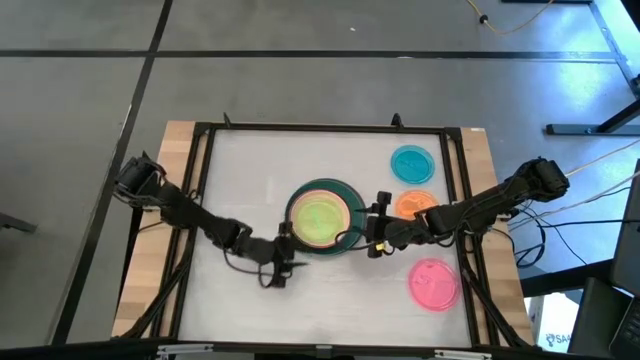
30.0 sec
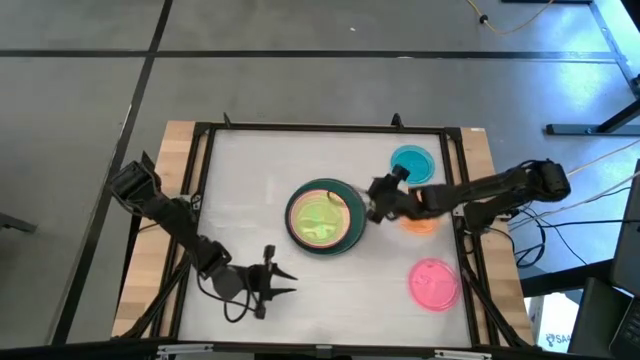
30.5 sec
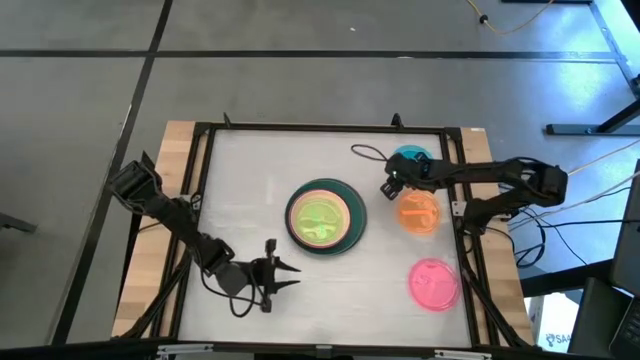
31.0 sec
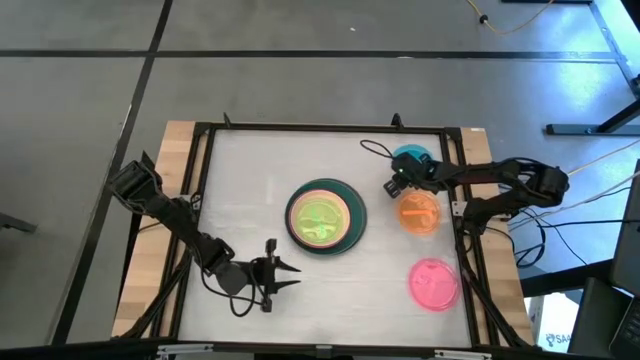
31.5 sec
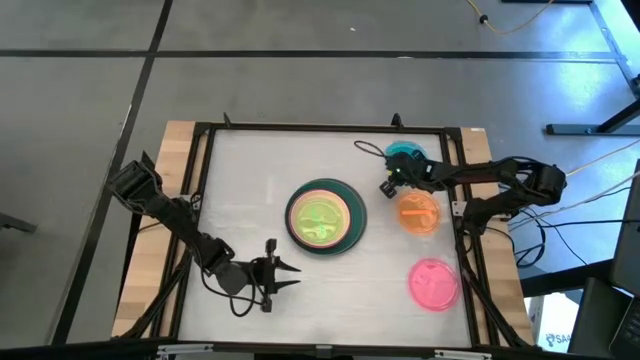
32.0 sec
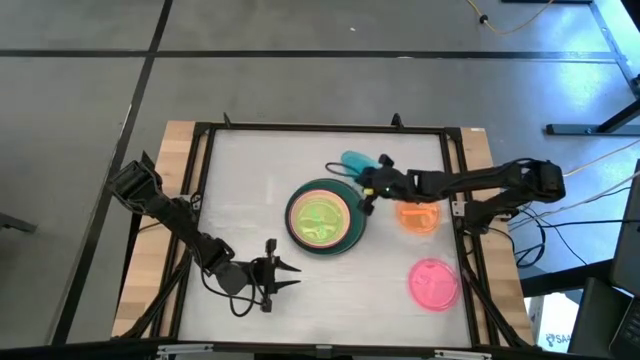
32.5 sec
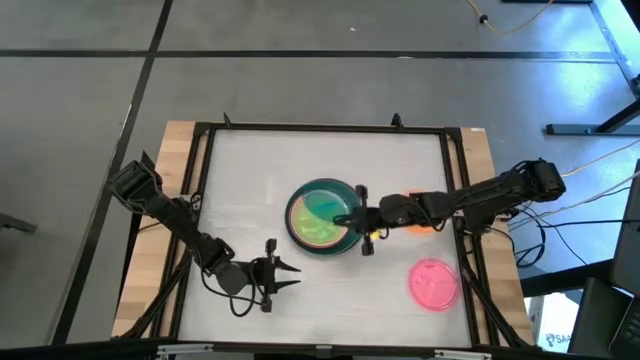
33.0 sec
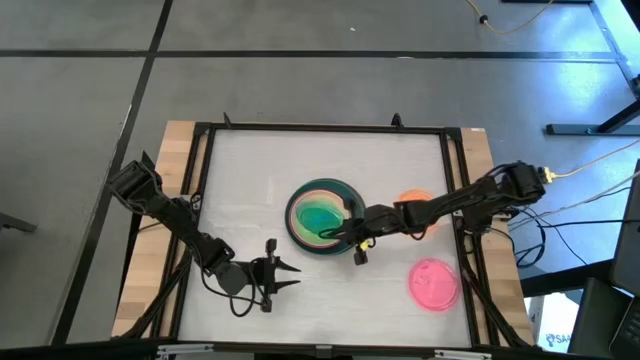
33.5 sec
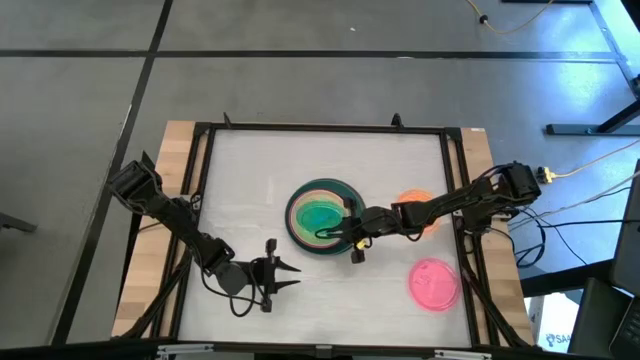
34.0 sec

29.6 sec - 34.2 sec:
Task: Stack plastic plates
Stack the blue plate on top of the green plate

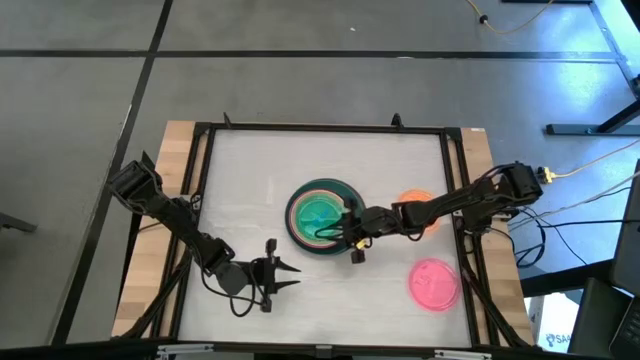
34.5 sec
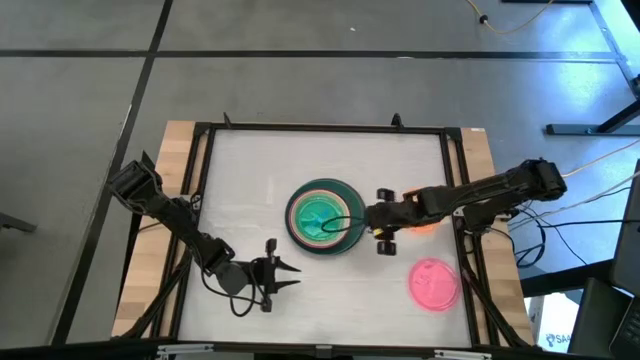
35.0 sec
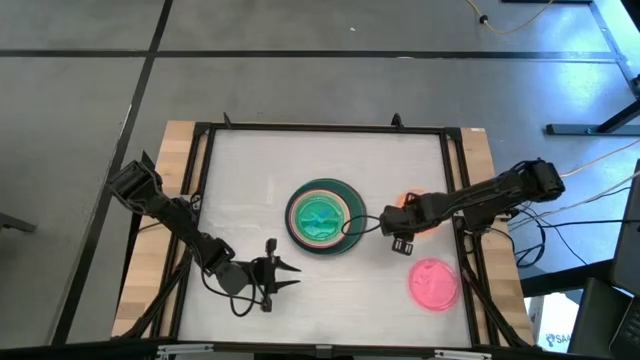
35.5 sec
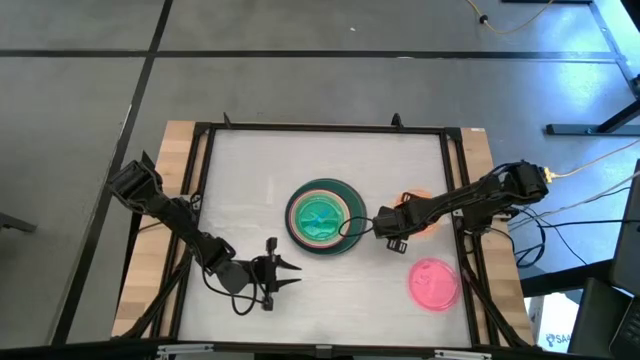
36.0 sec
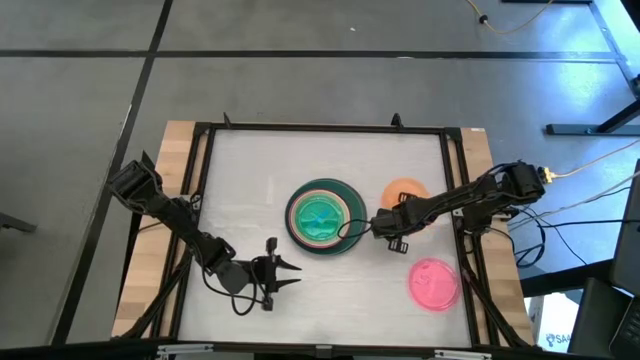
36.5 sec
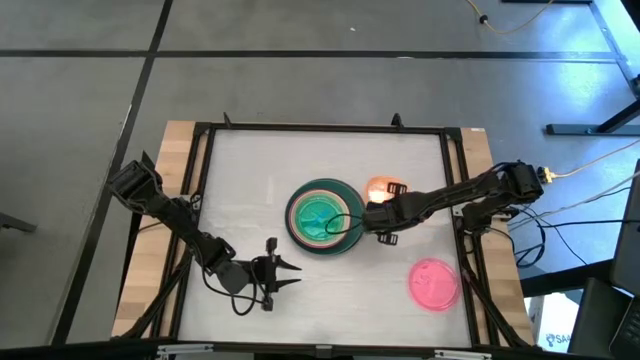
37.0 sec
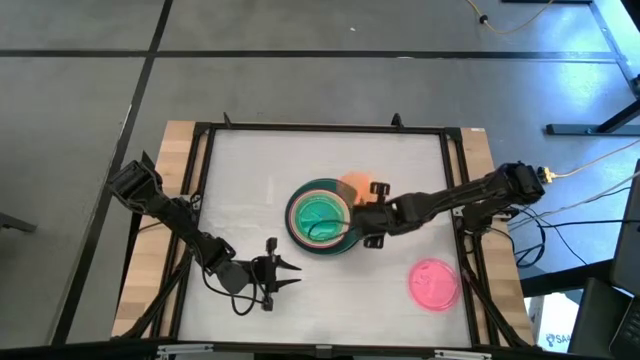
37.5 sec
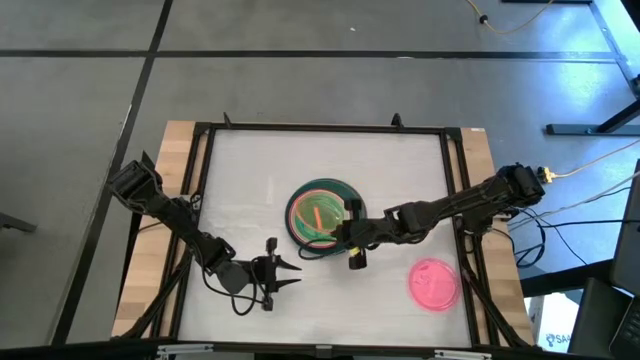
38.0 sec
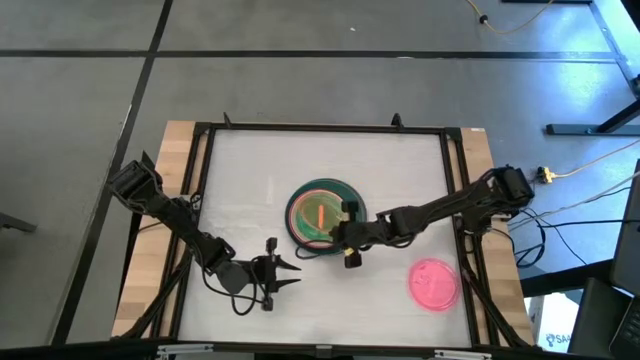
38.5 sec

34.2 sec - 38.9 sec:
Stack the orange plate on top of the blue plate

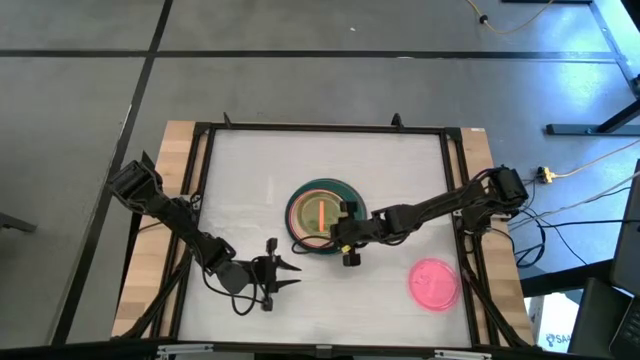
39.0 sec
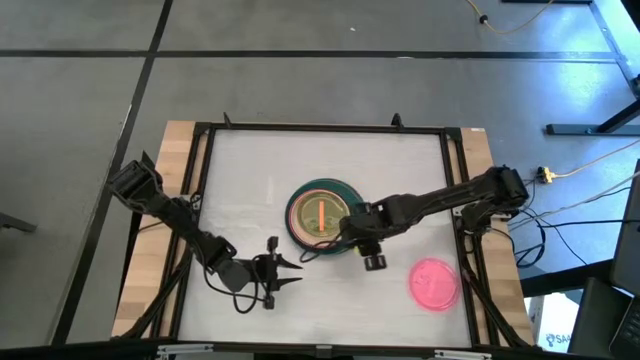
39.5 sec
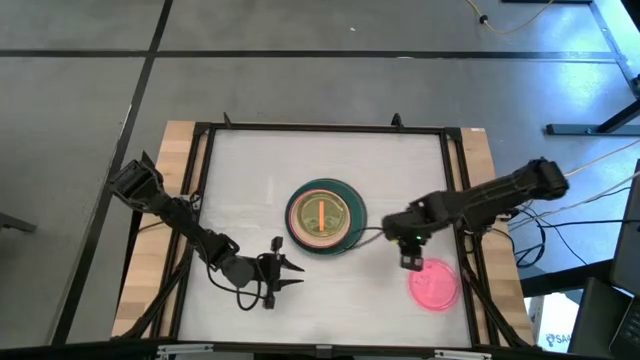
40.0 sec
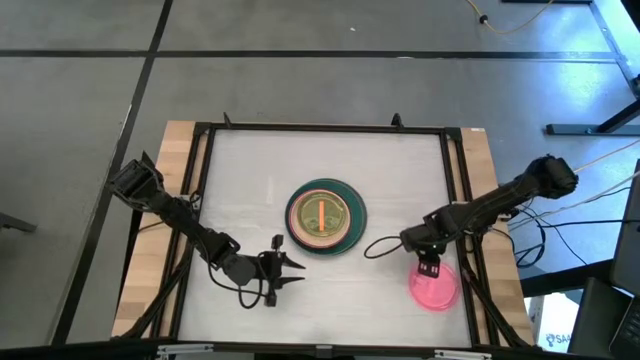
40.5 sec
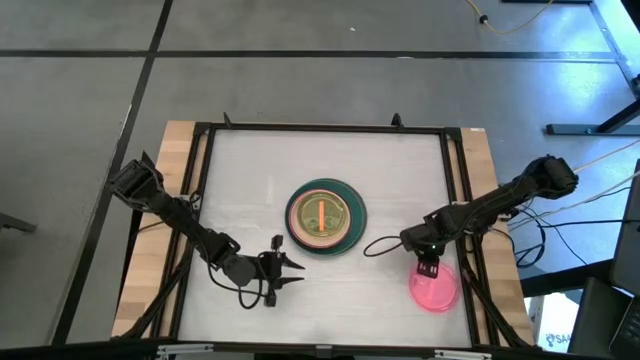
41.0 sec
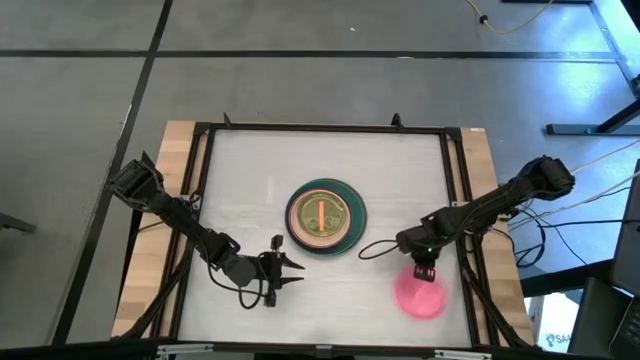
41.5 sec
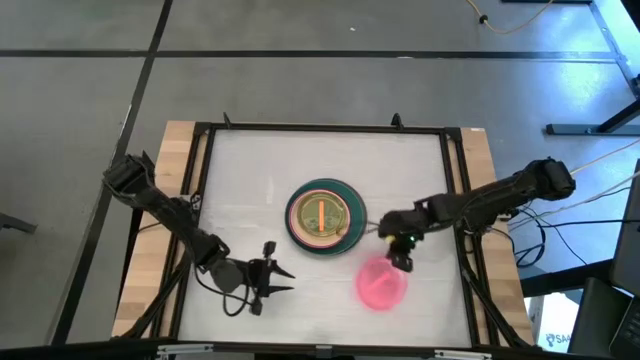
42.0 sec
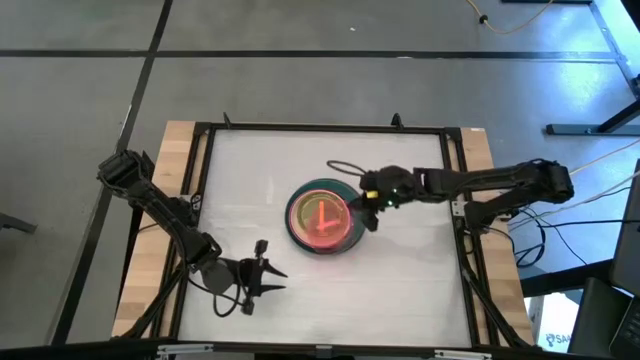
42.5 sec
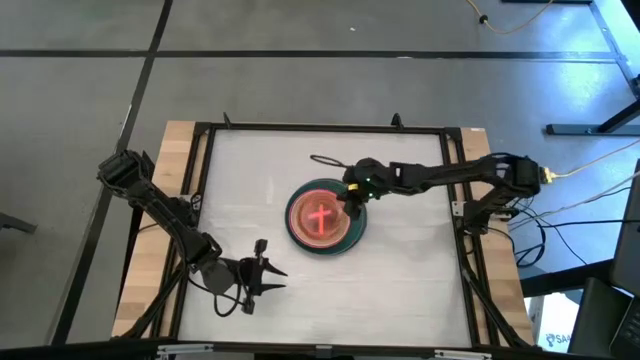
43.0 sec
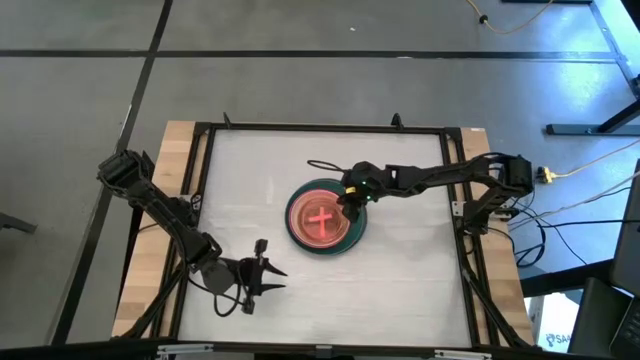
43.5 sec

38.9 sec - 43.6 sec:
Stack the light pink plate on top of the orange plate

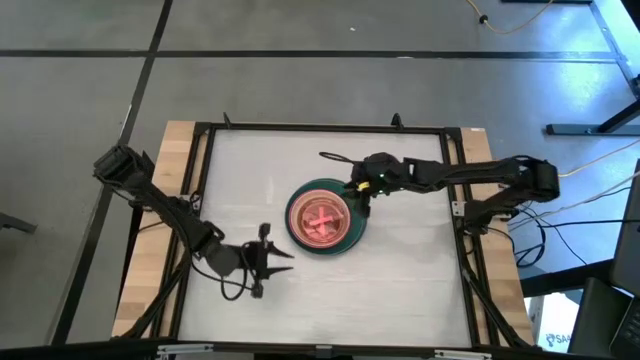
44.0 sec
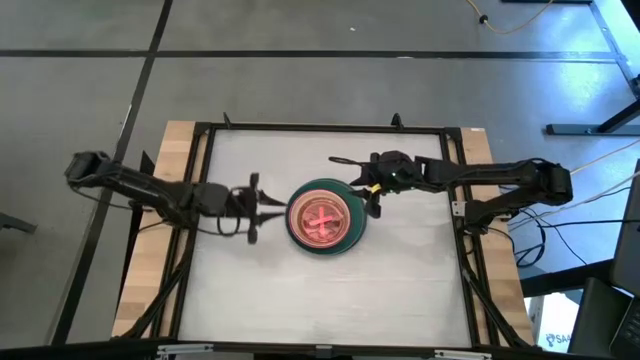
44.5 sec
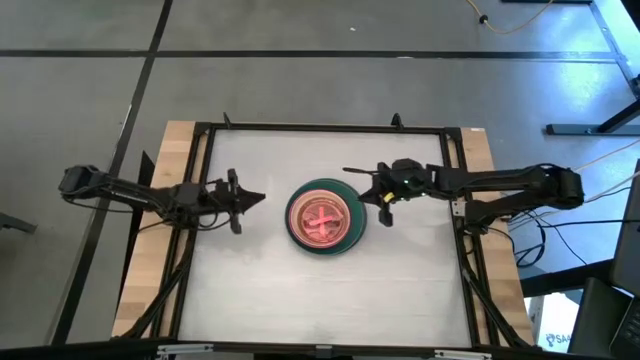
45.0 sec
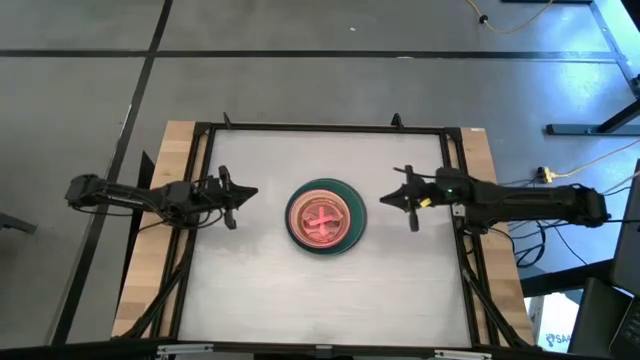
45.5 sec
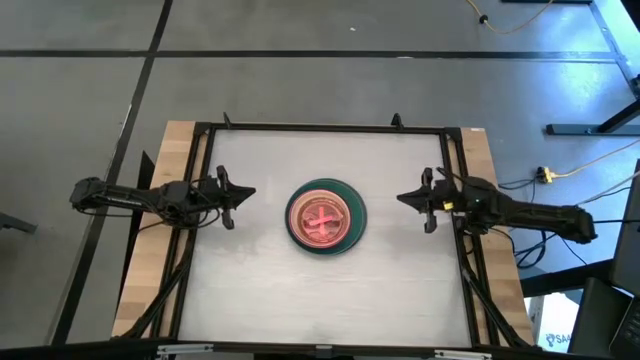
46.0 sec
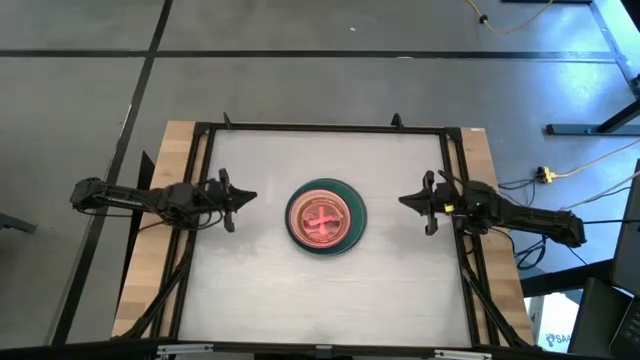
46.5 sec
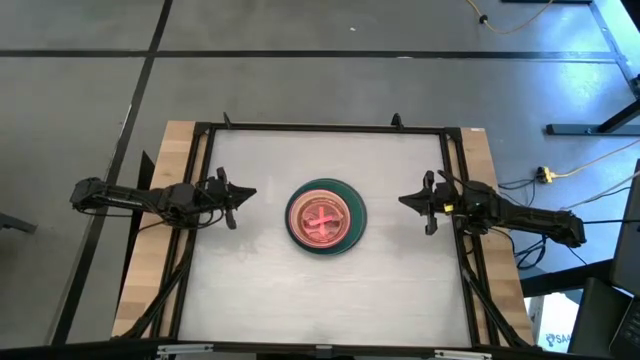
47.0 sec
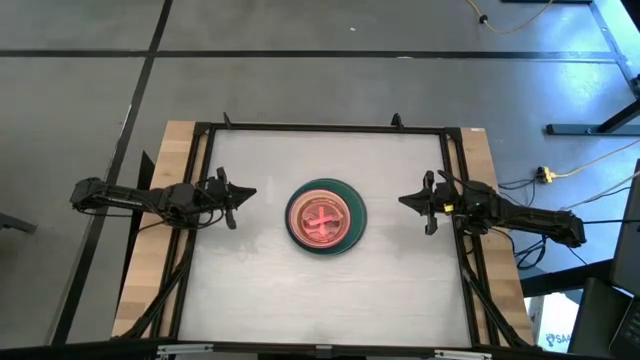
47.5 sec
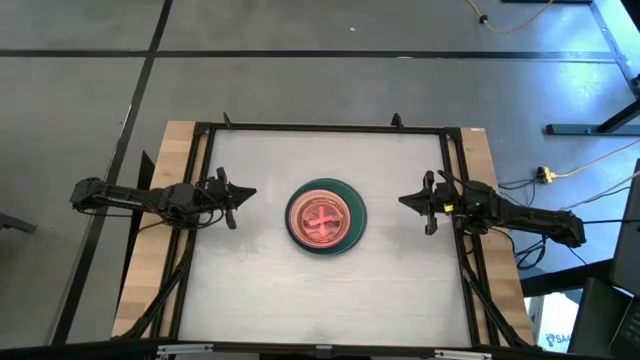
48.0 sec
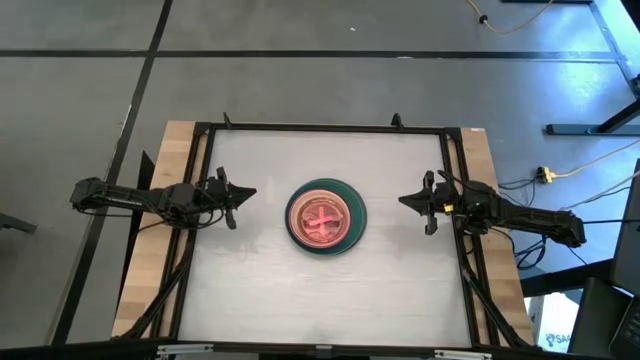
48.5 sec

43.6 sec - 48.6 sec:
Return to Home Position

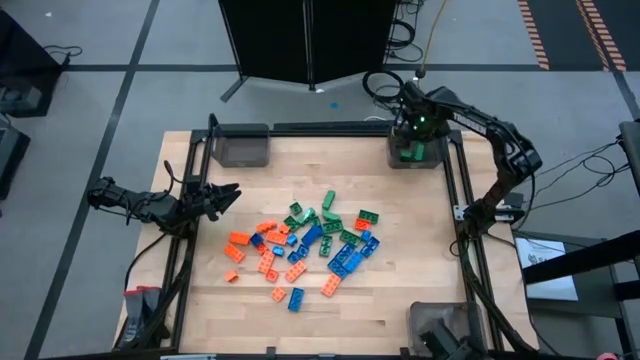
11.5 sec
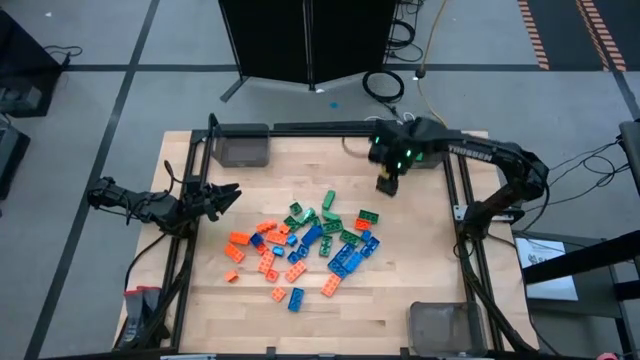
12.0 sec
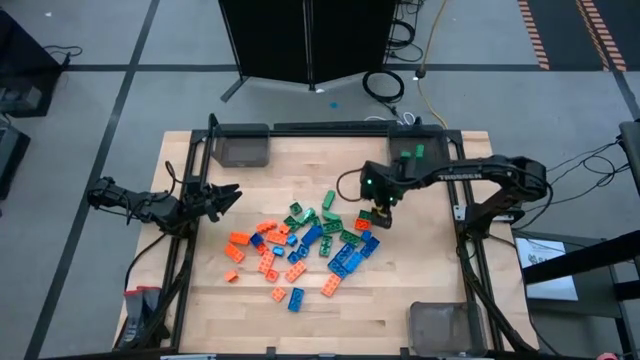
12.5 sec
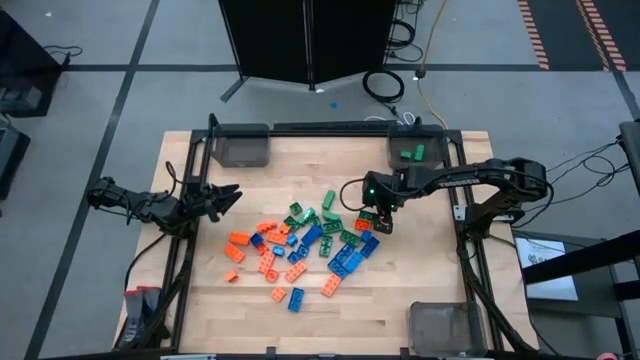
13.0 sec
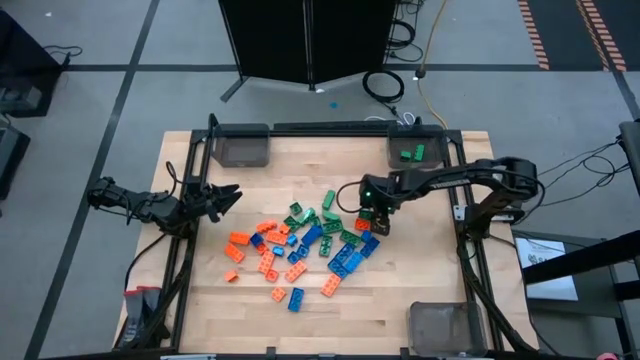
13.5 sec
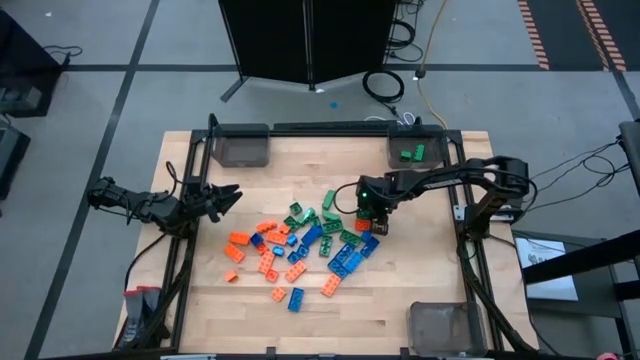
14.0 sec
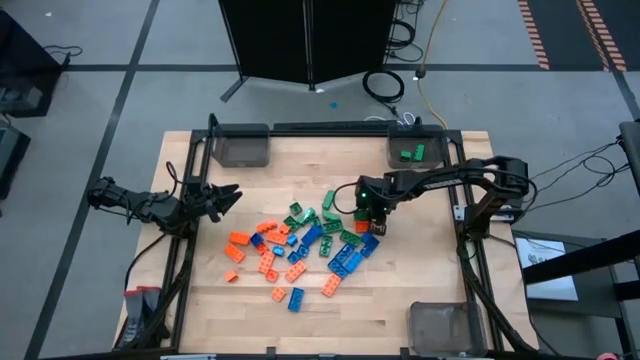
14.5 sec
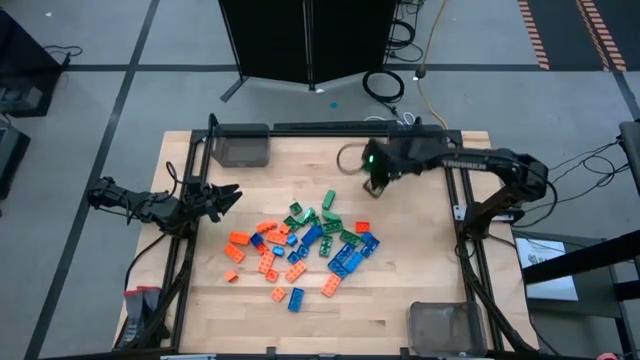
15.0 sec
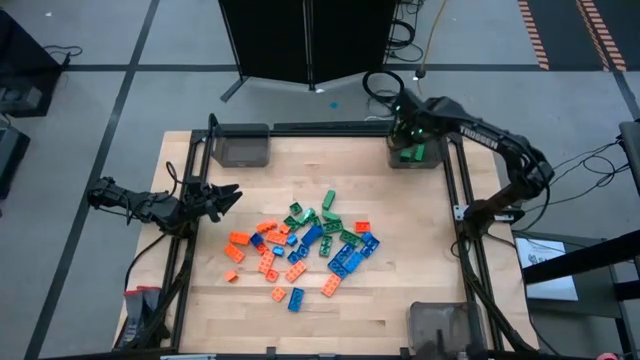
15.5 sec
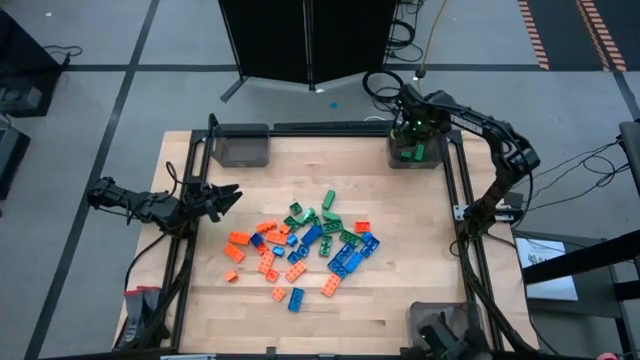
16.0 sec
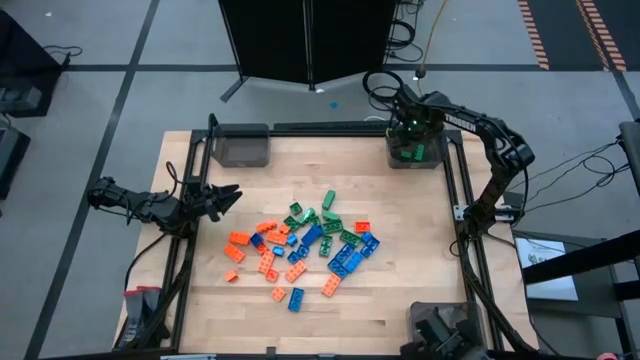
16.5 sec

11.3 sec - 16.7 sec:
Task: Sort blocks
Put the green game piece into the top right black bin
